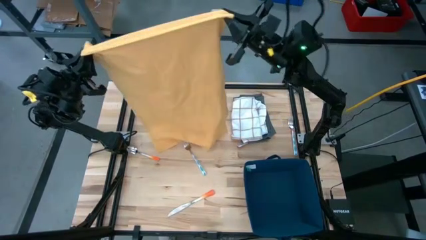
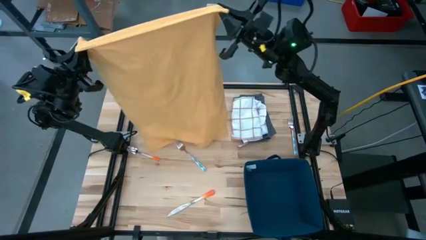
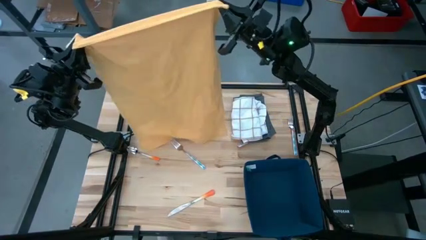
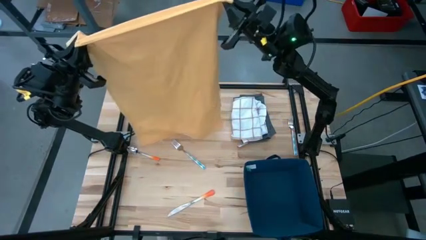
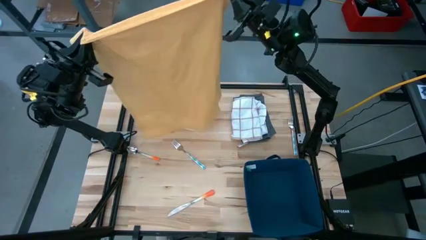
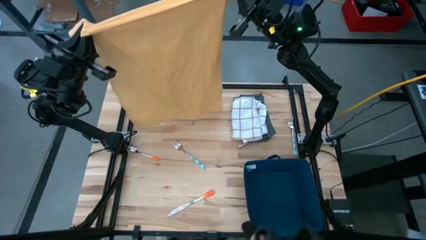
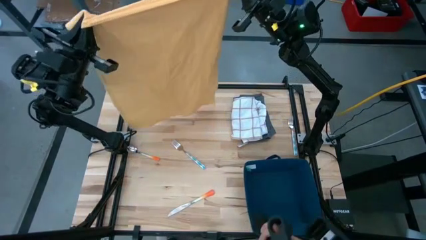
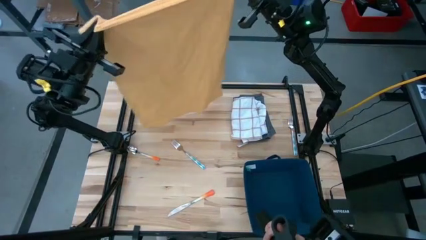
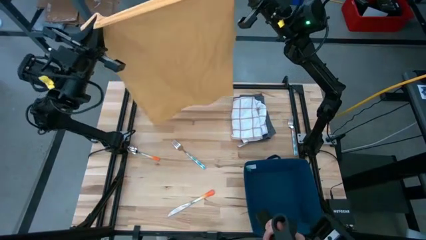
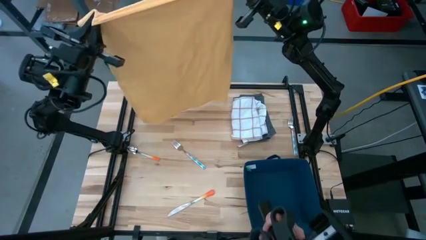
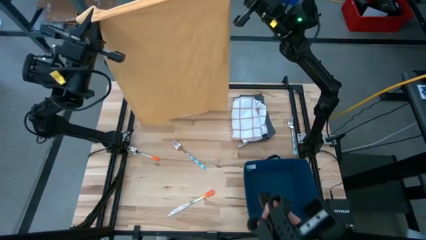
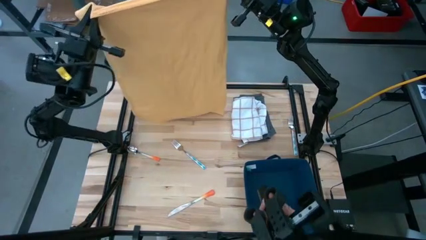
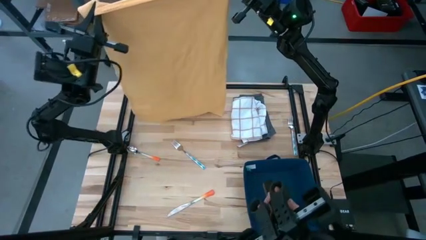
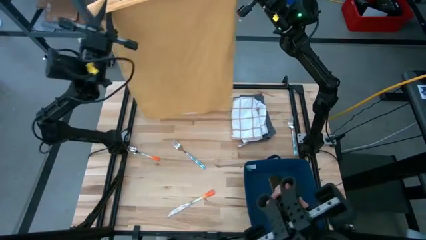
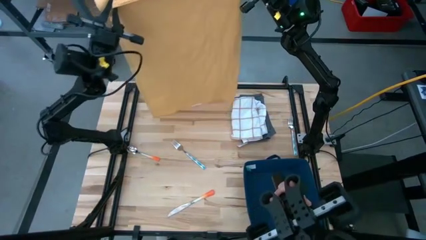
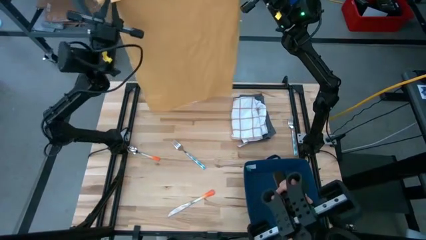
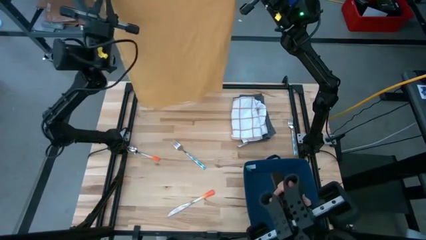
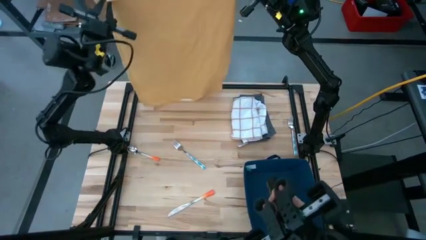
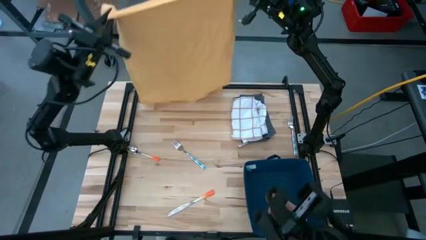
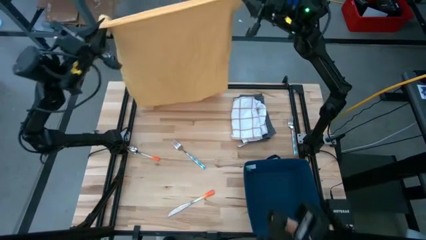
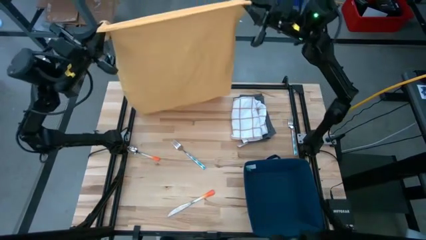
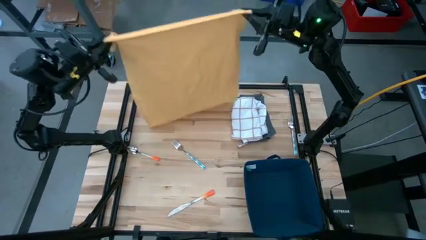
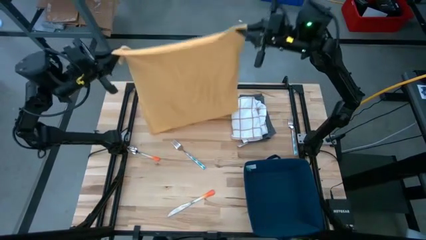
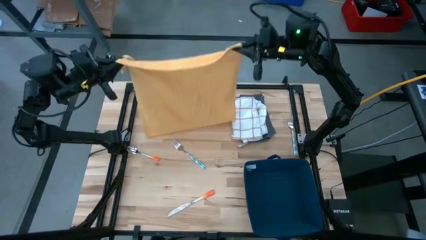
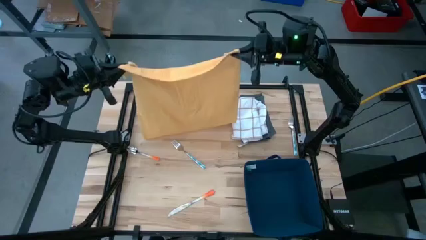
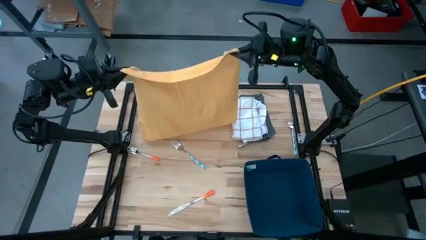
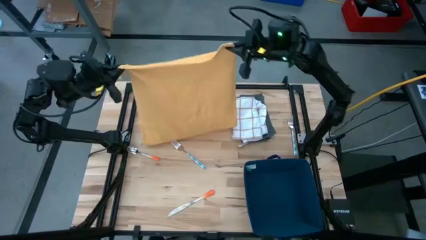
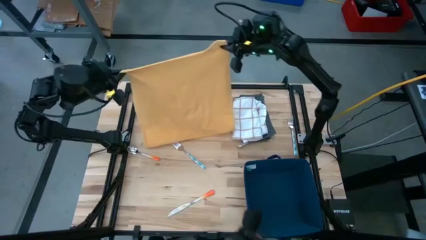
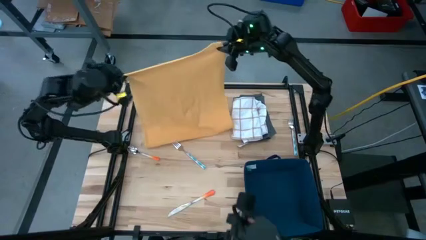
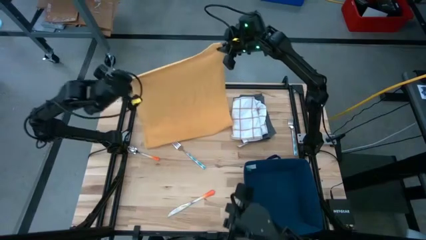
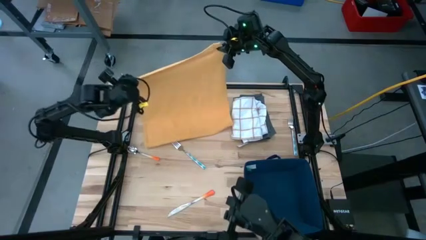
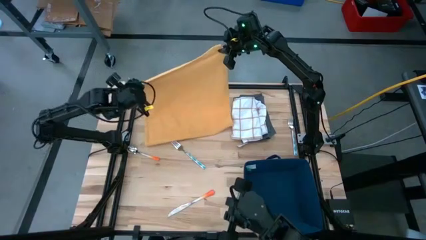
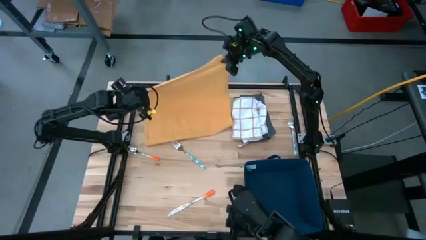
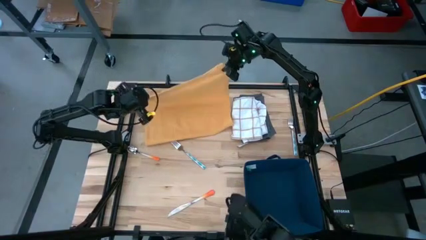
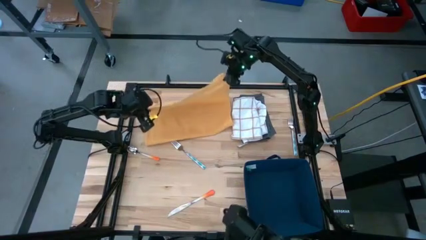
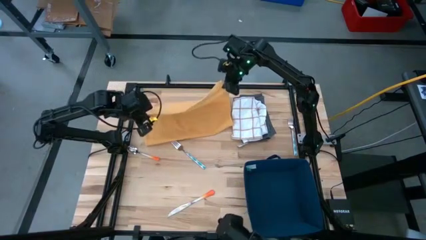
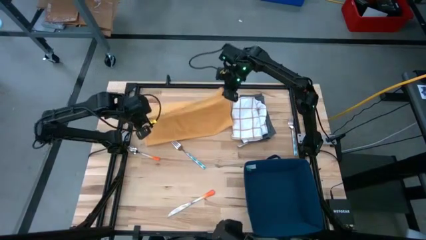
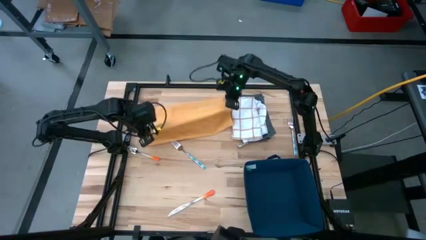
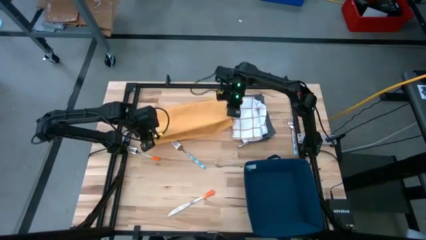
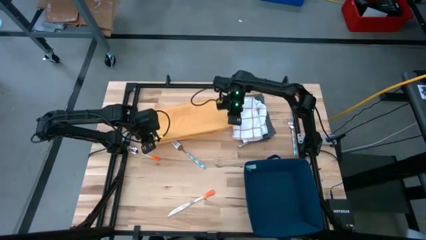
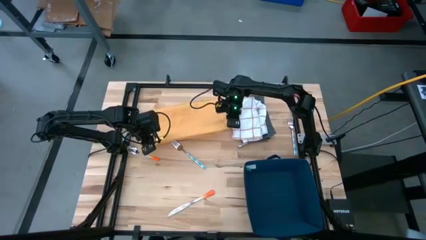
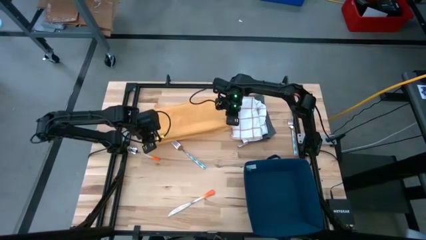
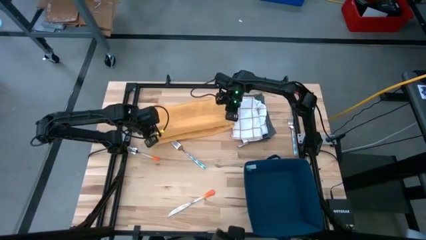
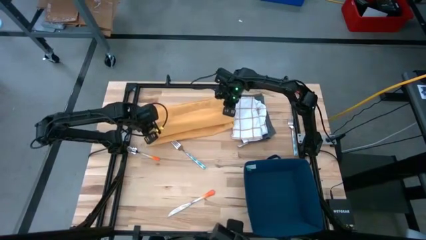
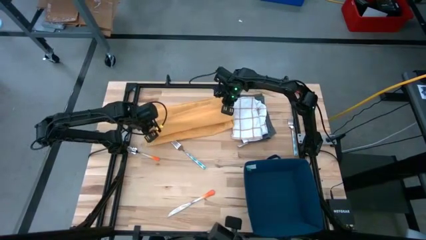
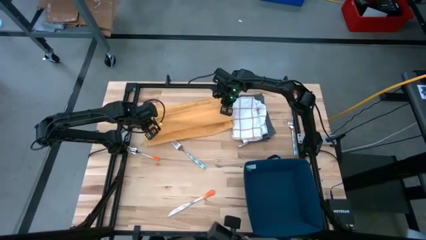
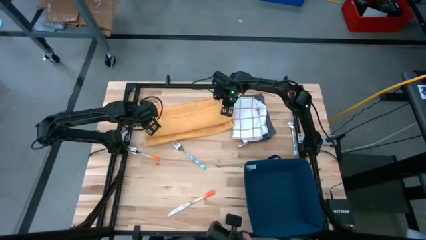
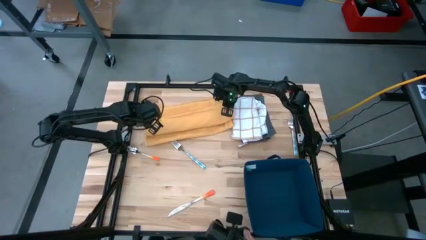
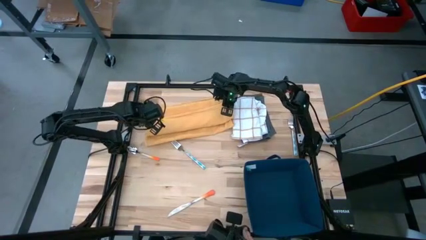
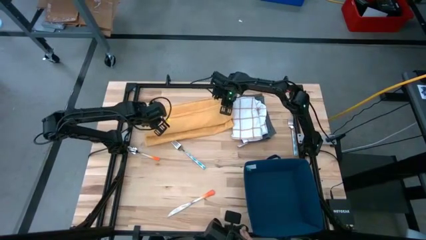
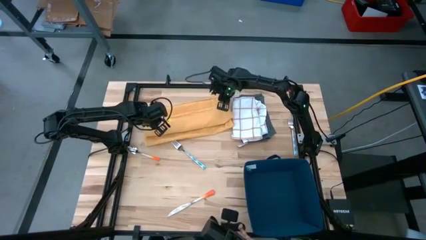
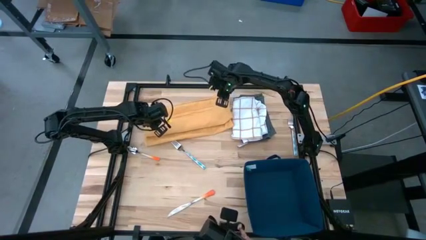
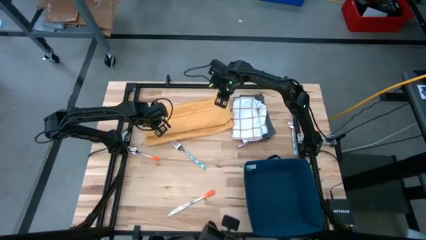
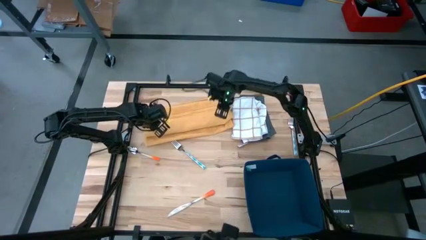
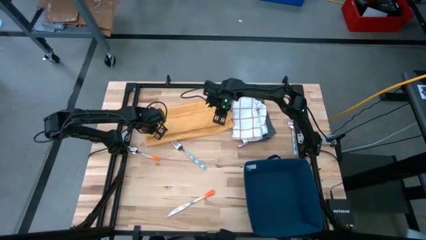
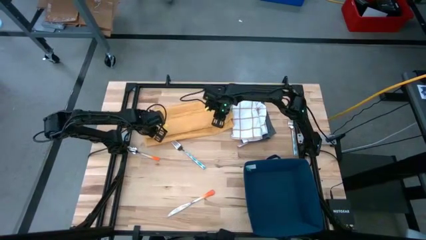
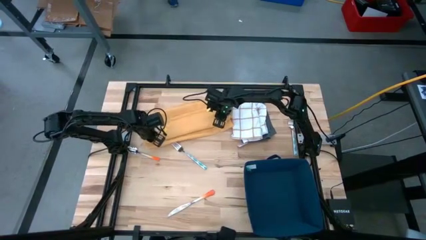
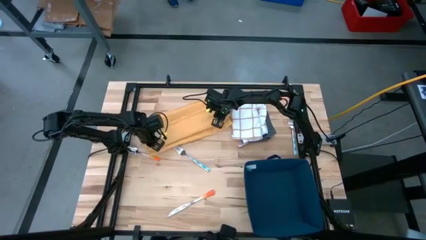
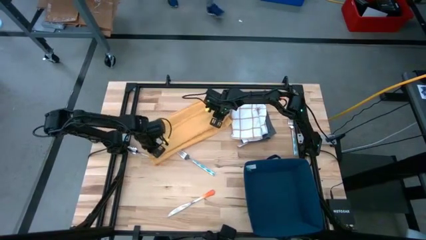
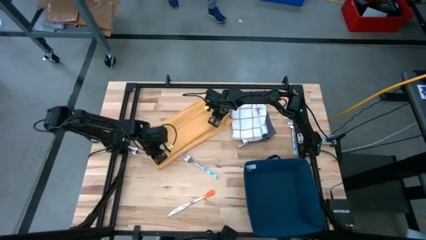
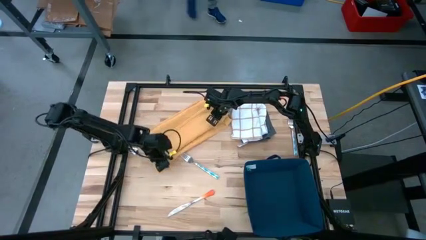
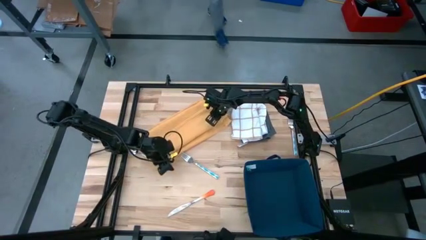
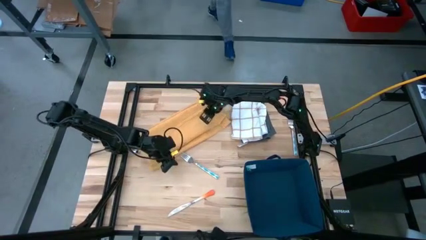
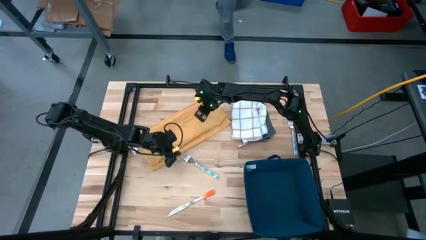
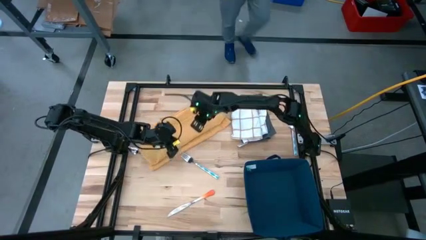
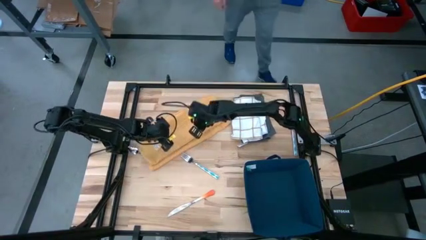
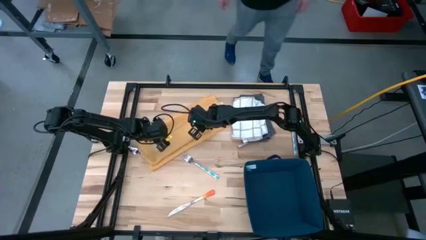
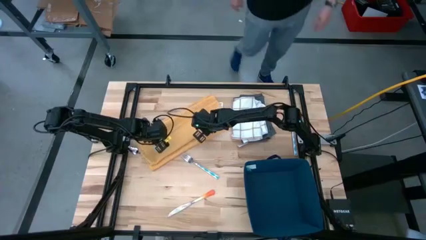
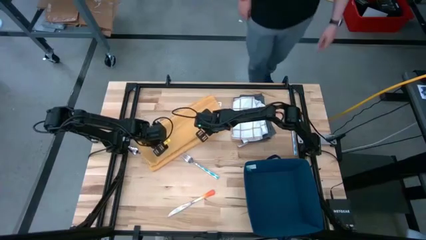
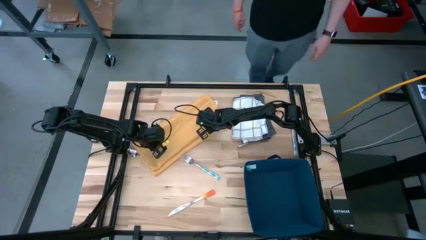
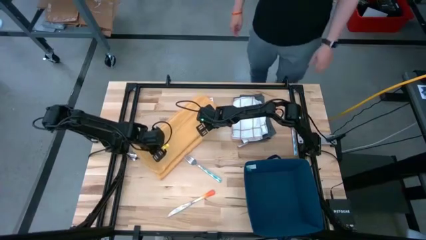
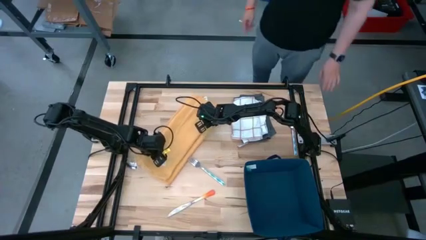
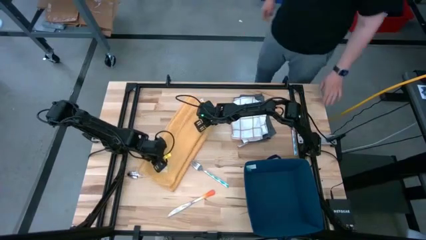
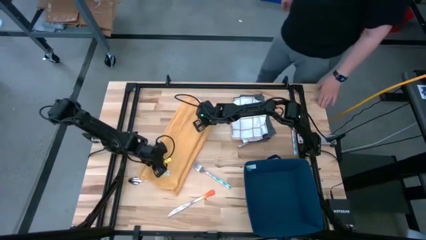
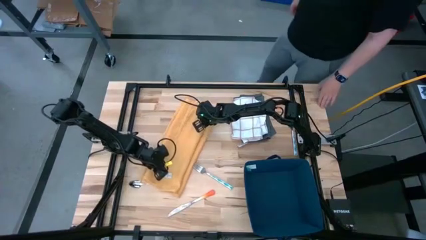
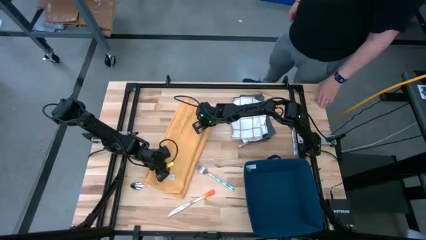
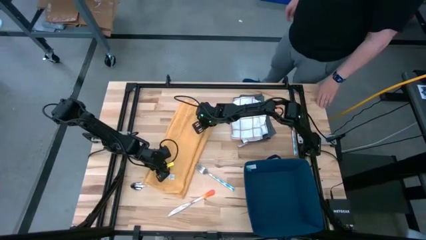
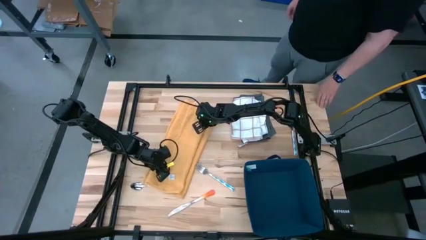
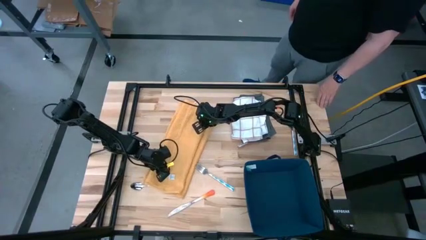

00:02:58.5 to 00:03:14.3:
Task: Fold towel
Fold the orange towel
